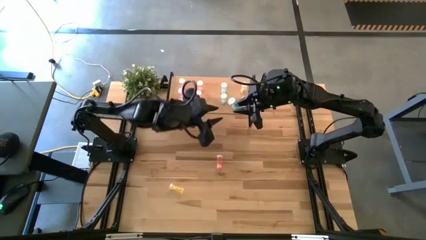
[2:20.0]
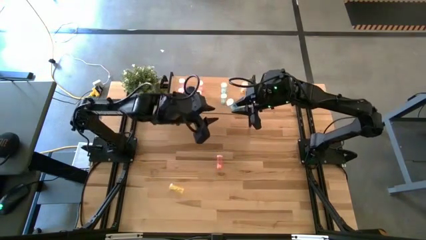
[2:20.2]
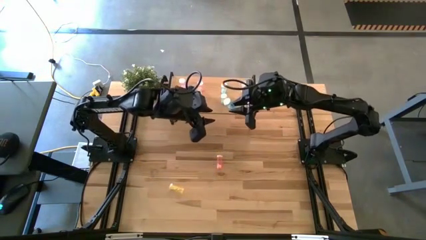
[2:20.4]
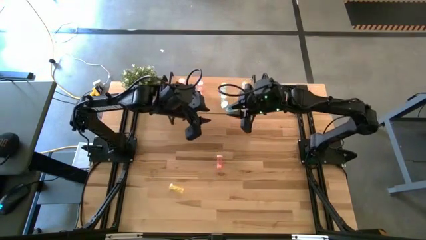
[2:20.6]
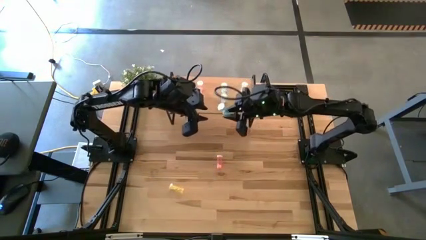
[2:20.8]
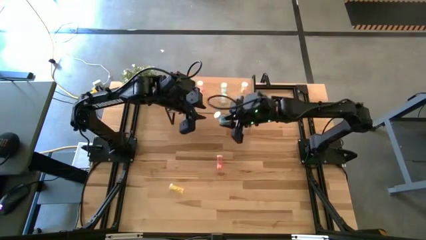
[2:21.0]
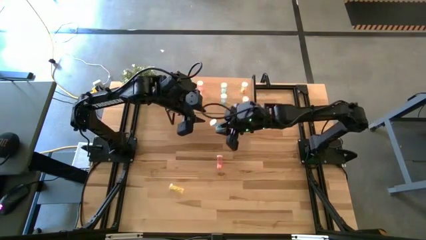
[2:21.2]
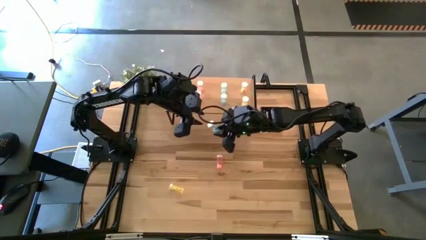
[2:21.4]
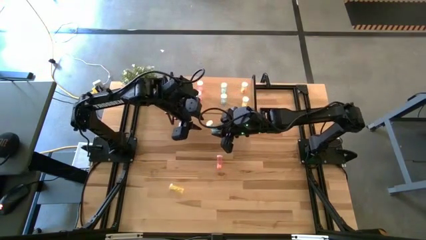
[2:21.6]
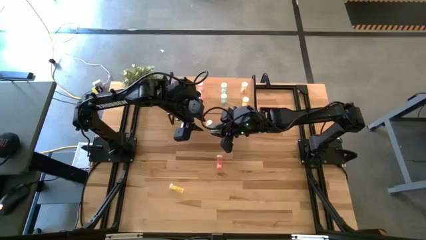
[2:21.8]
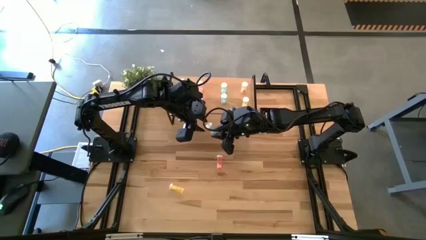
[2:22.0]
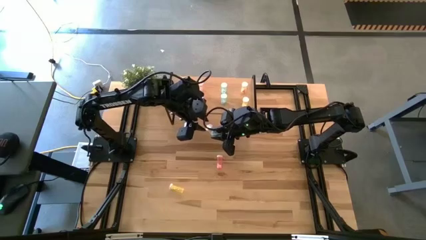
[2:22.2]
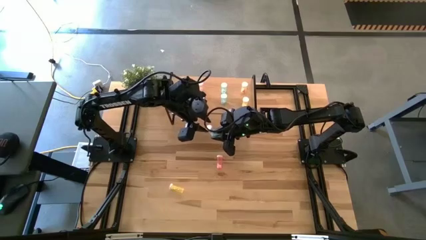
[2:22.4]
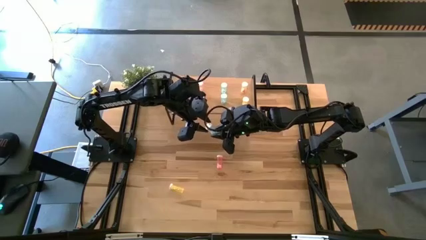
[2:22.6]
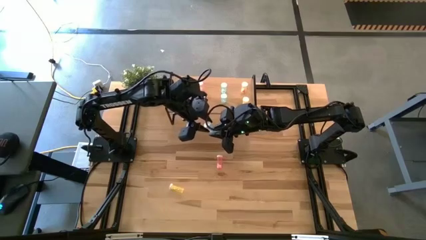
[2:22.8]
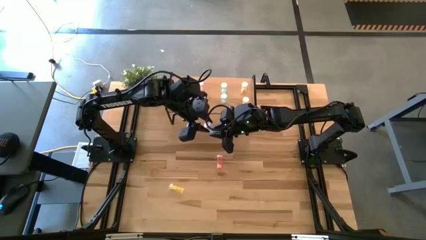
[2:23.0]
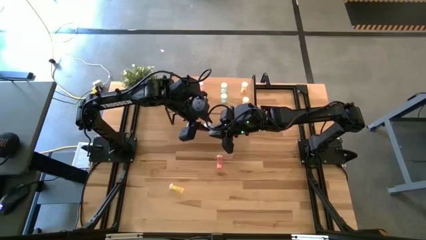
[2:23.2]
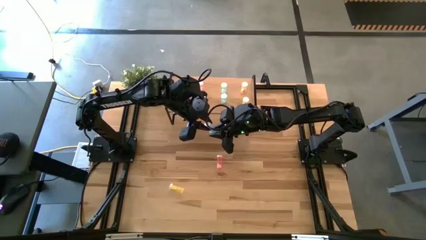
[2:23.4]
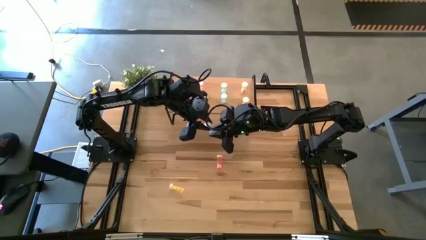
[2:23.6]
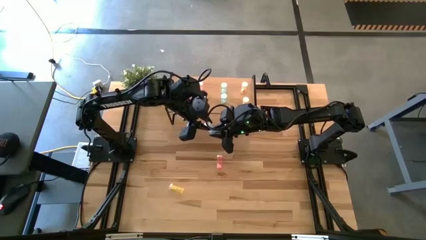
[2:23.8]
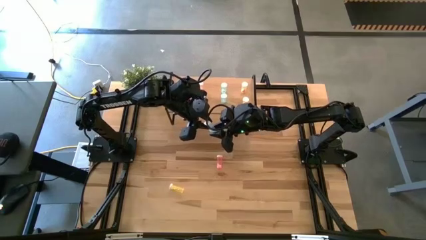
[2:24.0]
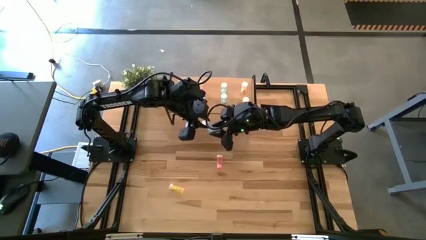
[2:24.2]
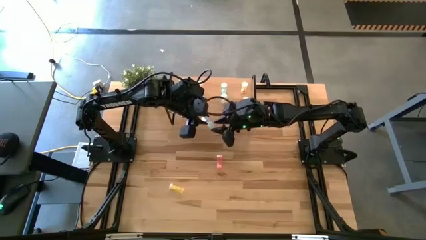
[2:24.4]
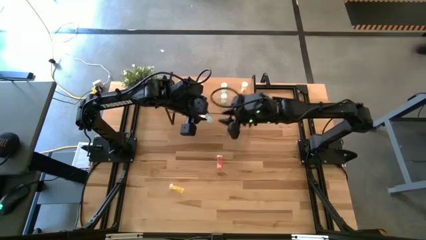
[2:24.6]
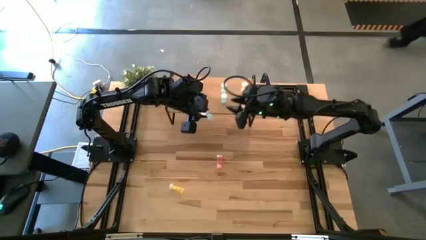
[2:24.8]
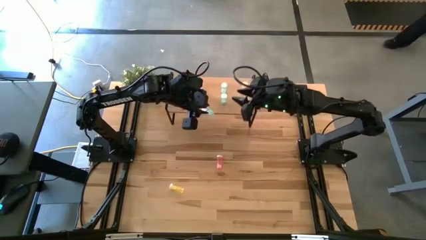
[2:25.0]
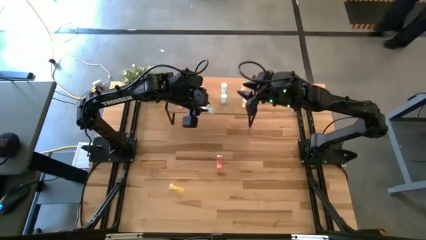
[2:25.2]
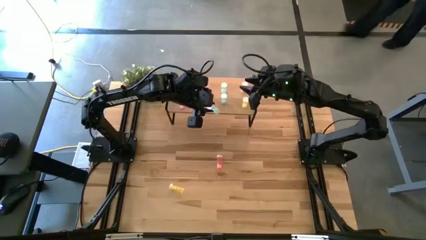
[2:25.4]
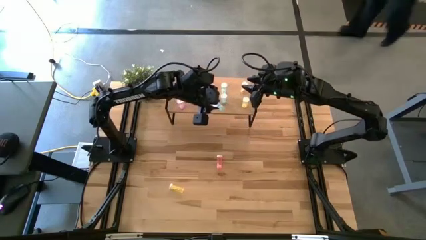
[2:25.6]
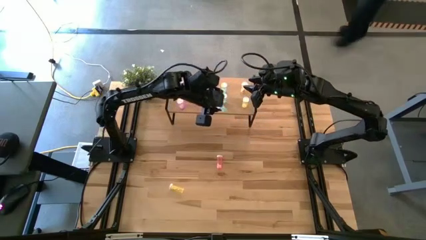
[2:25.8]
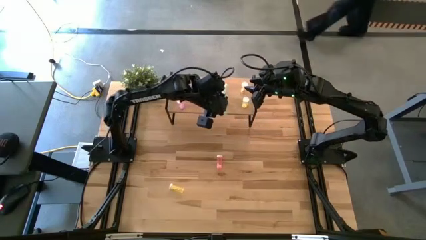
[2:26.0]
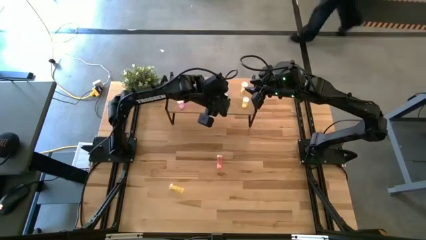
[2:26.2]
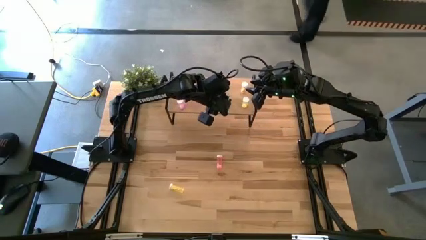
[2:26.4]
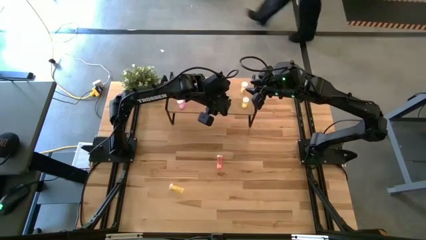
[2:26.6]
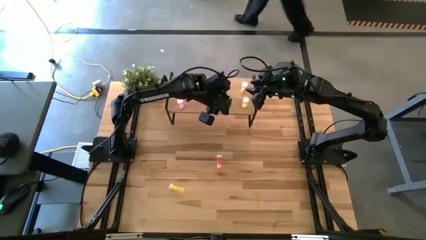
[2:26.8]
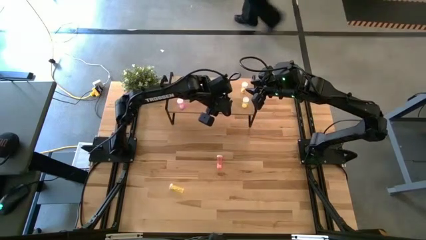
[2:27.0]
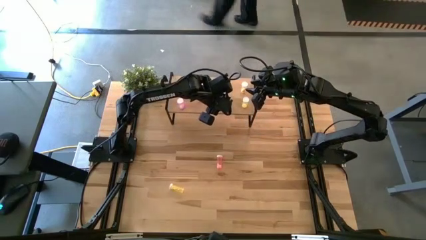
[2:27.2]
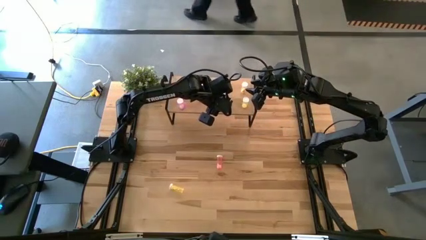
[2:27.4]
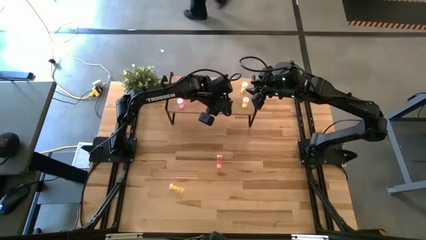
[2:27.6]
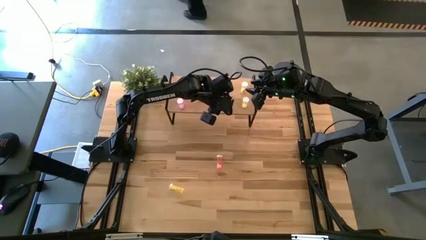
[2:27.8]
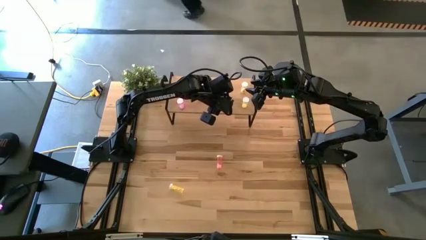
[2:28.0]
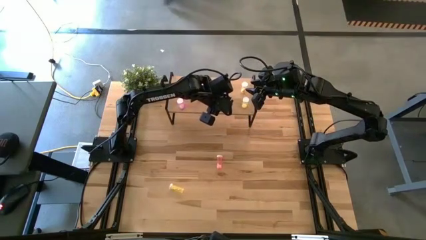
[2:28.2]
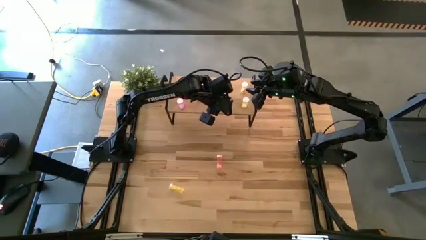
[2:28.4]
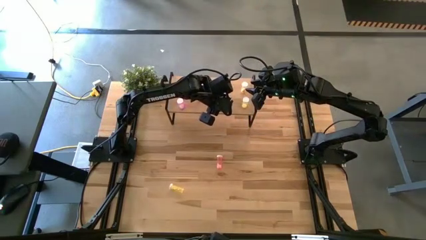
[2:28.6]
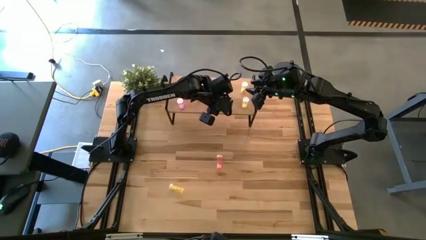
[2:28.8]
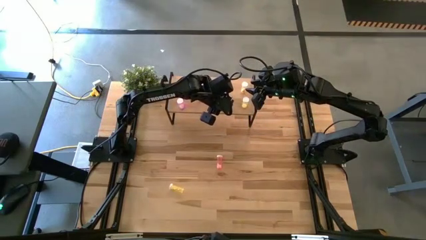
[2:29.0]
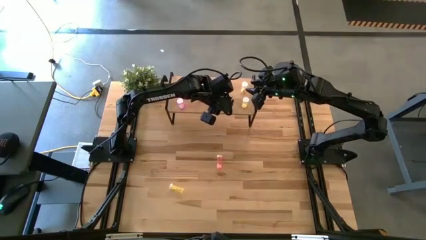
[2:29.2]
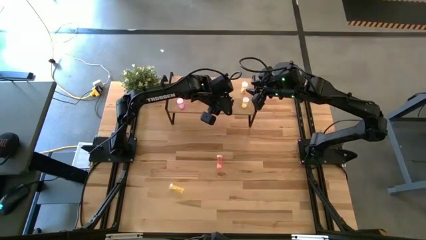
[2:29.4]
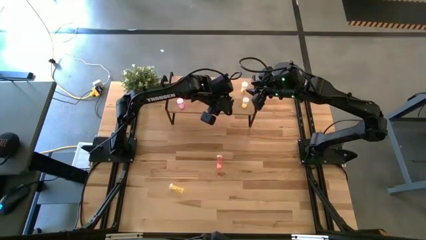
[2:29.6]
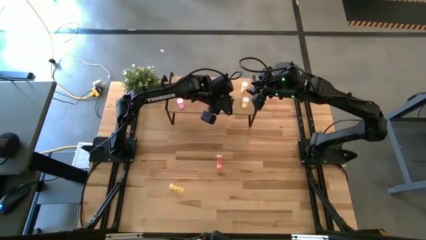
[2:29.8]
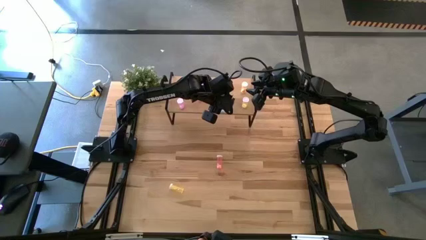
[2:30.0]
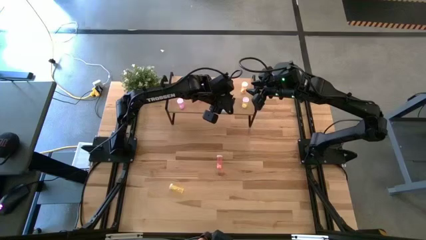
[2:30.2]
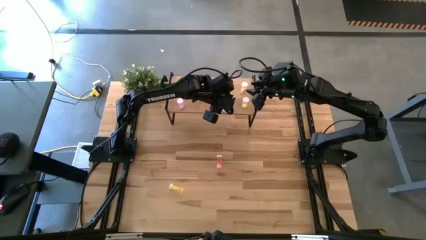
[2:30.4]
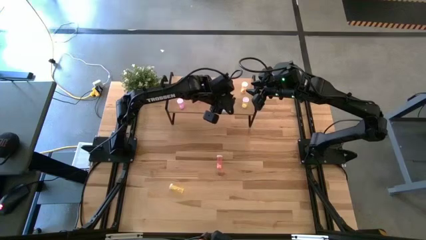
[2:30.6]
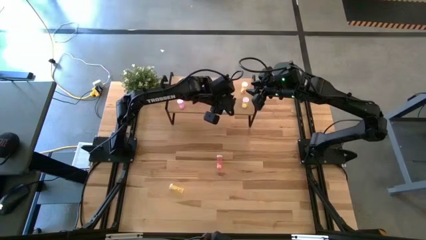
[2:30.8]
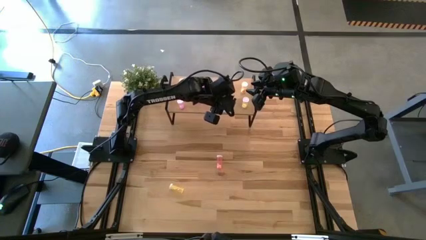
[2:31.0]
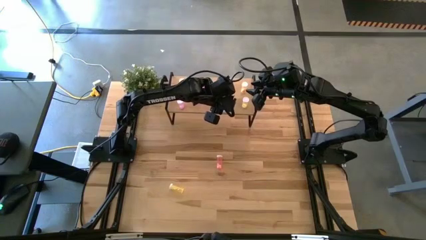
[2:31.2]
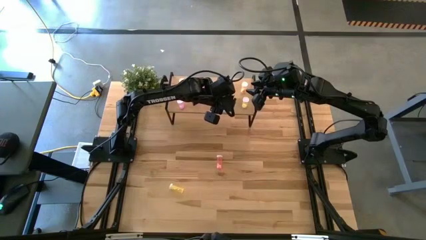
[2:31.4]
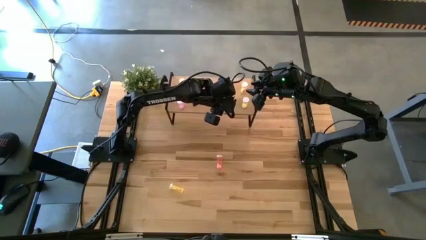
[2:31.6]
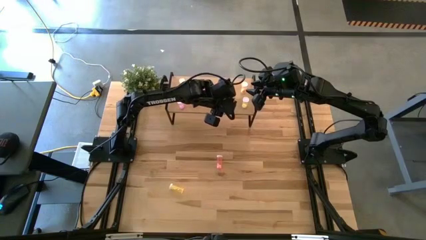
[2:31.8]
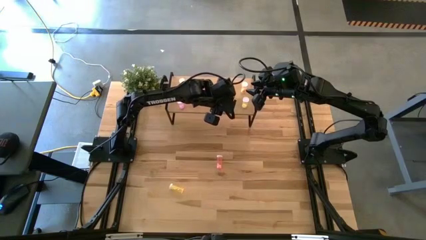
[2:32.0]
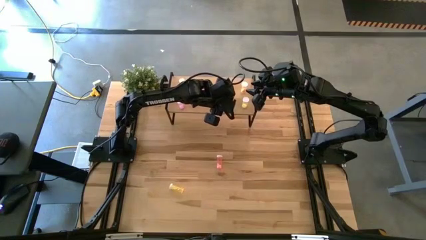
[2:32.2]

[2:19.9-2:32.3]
Task: Pick and place medicine bottles onto shelf by color
Put the blue pill bottle on the shelf aligned with the other blue pill bottles
